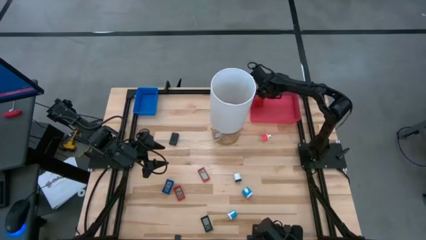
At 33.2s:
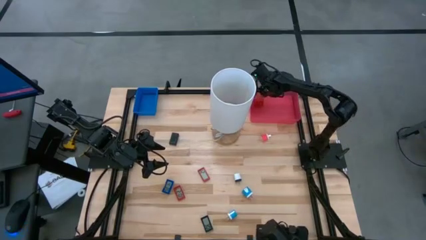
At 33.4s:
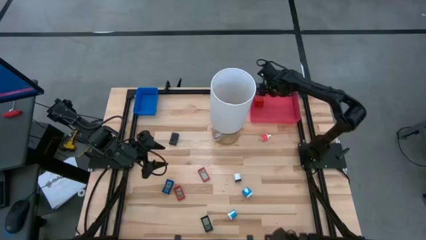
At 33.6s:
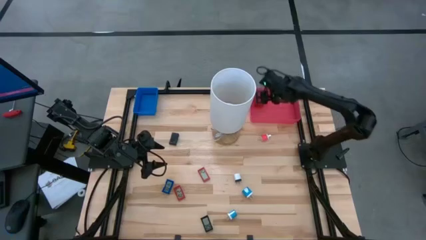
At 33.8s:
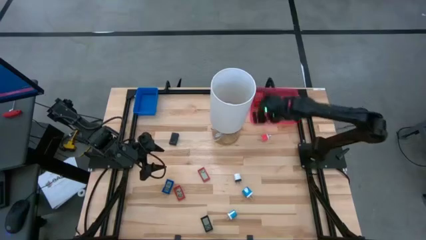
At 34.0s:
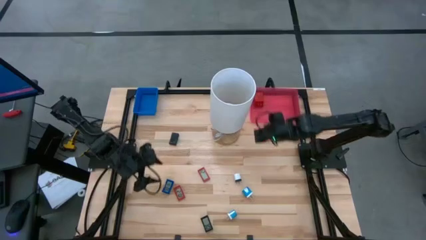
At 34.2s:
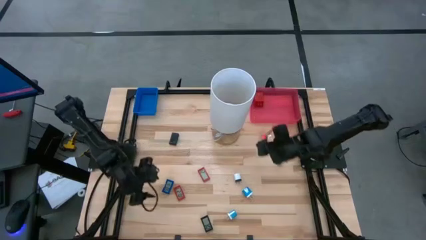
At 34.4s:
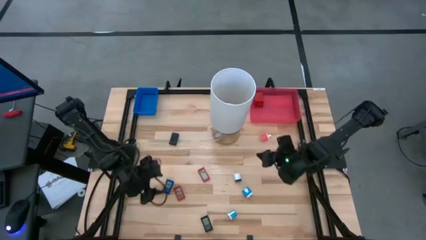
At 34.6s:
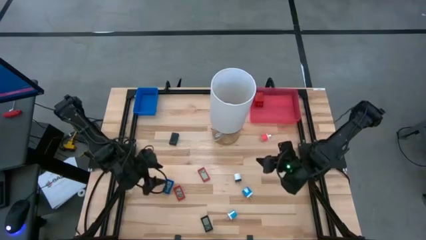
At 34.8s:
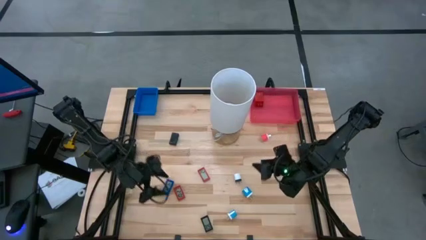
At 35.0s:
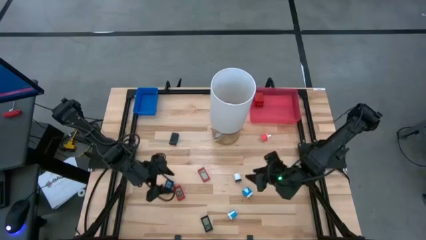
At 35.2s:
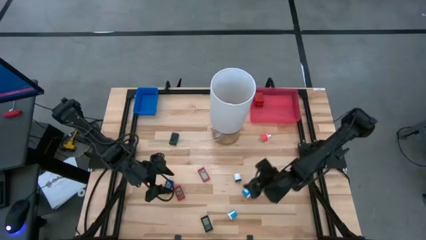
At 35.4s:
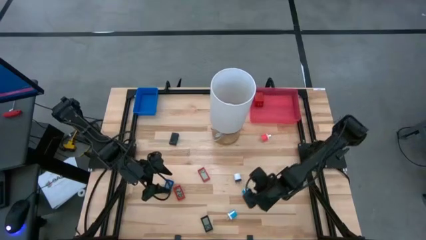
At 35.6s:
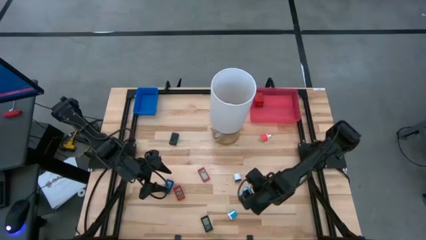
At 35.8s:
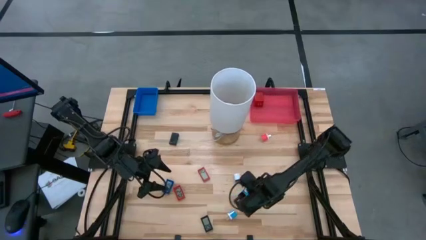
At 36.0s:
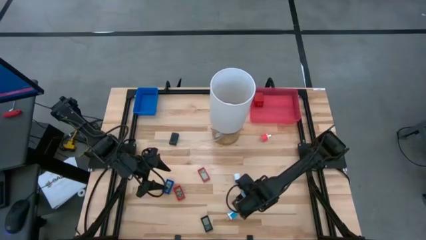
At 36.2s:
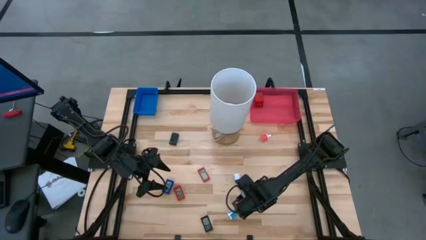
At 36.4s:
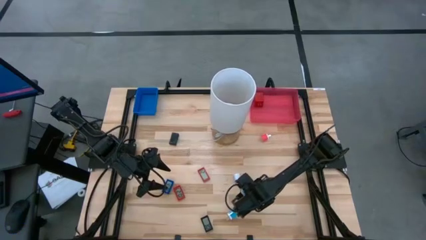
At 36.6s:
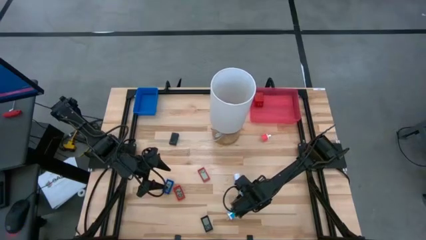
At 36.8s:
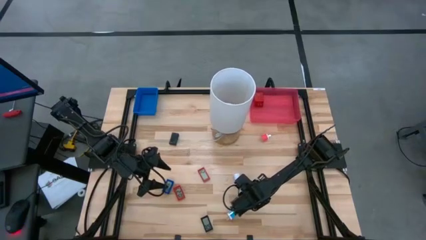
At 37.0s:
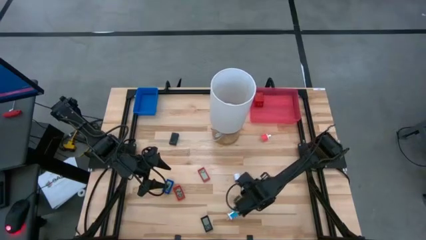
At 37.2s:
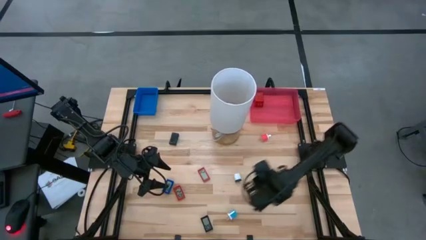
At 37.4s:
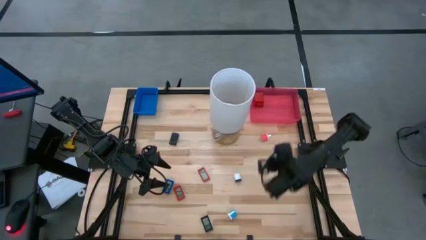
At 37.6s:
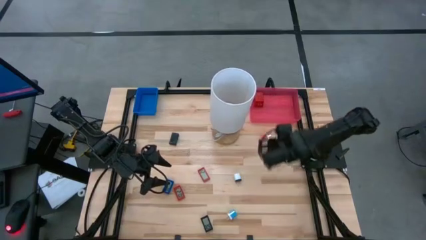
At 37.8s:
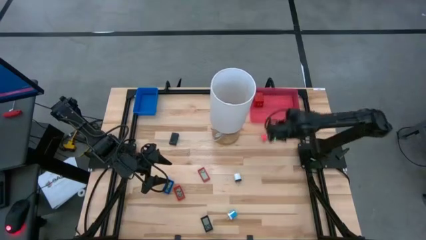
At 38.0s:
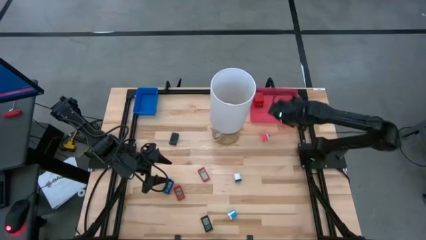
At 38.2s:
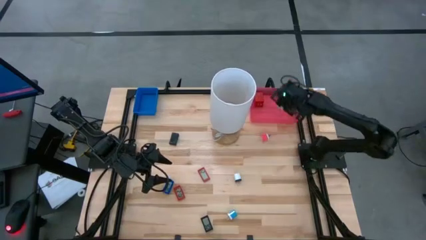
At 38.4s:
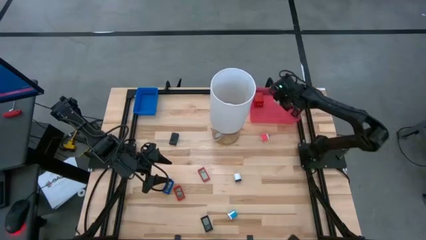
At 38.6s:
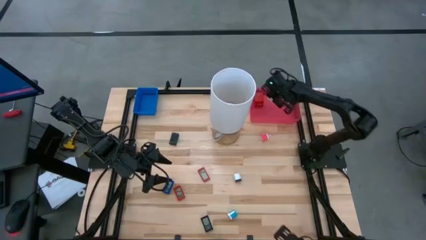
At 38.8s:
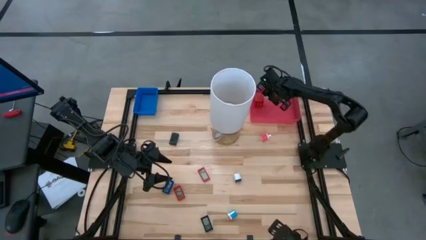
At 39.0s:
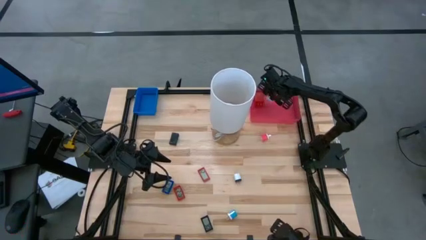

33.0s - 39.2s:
Task: Pick & Place Office items
Put the top blue charger adapter into the pink bin

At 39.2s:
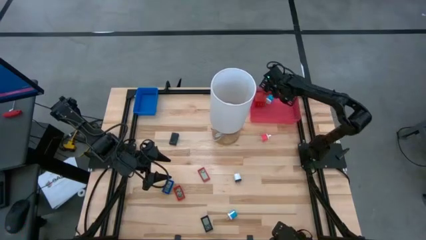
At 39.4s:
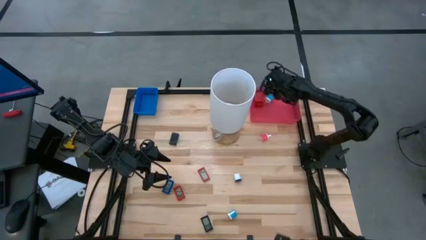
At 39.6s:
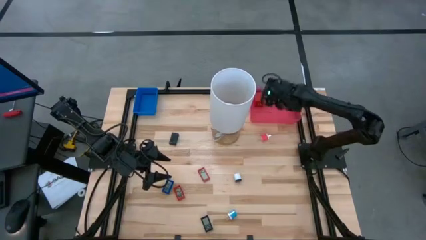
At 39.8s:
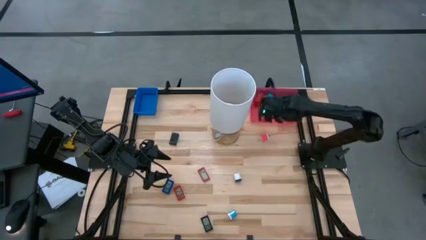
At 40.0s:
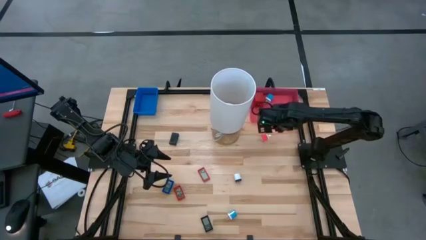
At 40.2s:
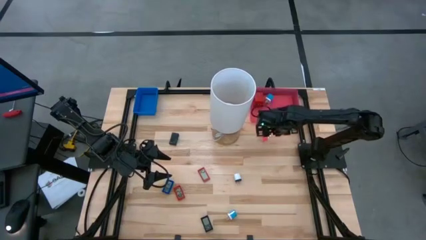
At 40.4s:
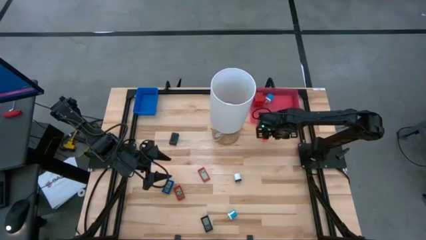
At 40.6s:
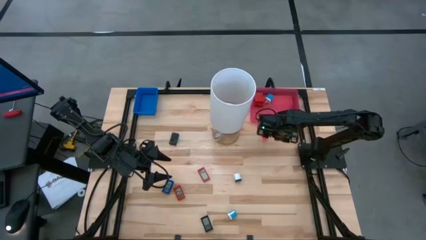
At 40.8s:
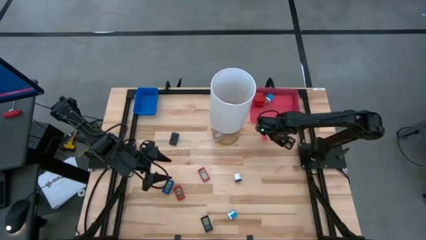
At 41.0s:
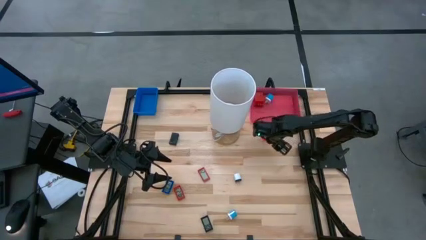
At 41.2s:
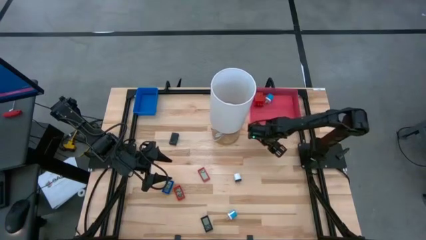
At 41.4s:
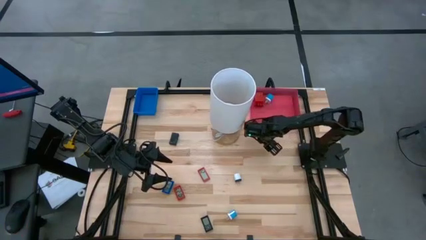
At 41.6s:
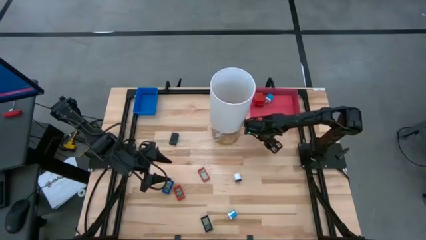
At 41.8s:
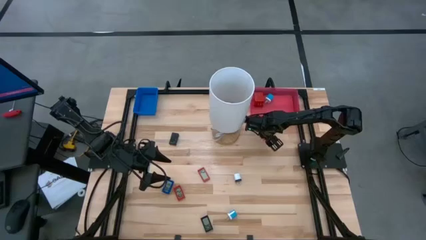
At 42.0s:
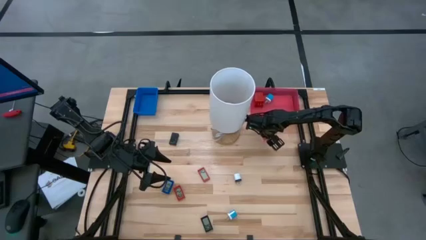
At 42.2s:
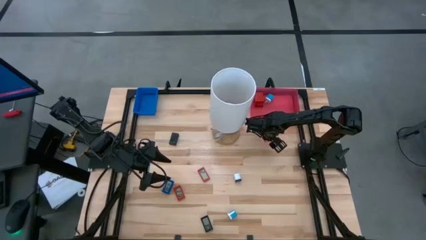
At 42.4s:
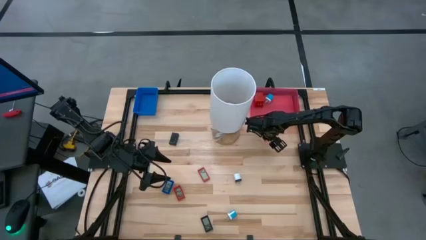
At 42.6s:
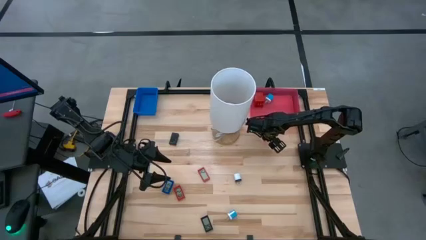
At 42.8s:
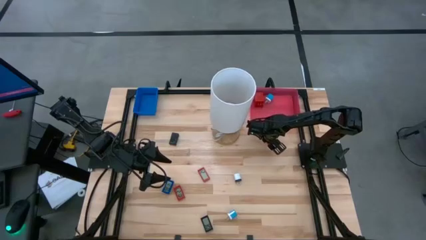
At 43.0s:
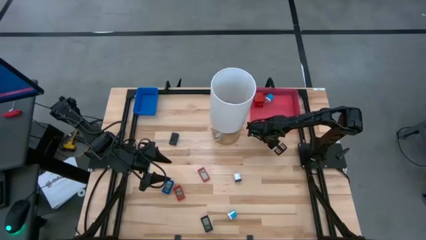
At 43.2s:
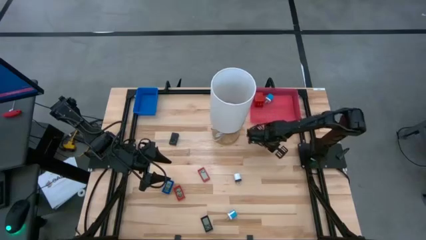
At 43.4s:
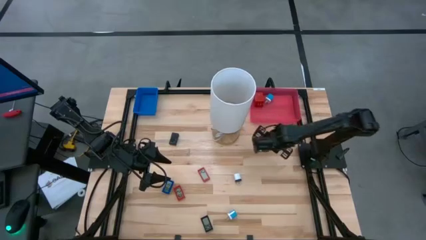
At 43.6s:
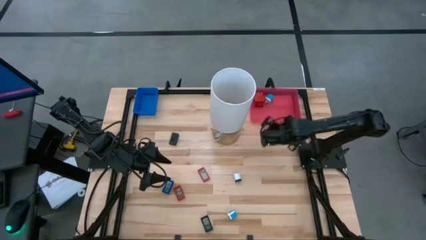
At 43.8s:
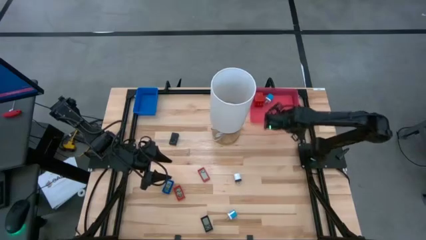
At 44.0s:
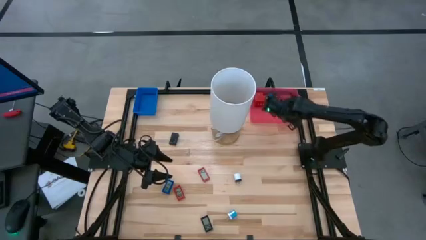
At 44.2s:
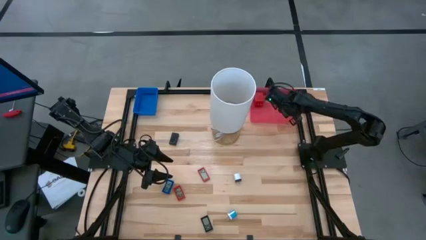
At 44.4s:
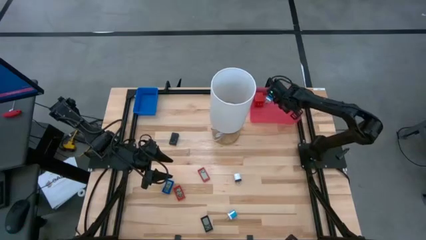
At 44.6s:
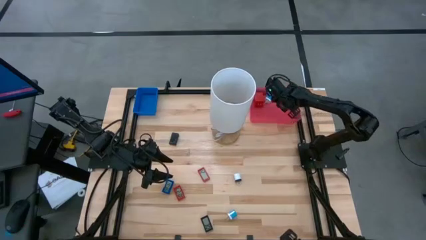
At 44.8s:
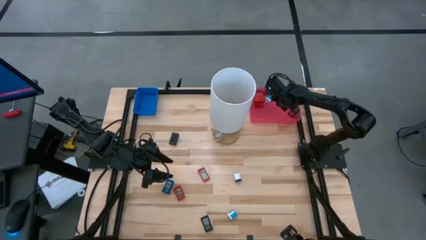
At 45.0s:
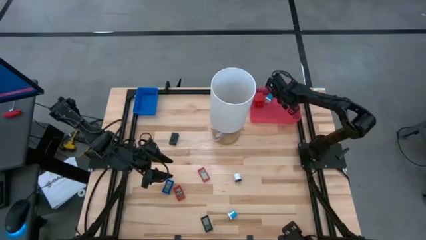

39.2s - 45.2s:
Put the pink charger adapter into the pink bin

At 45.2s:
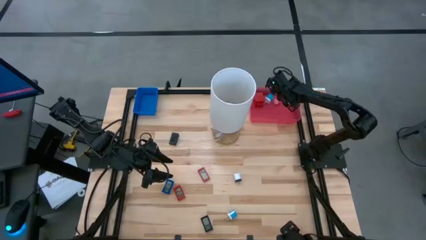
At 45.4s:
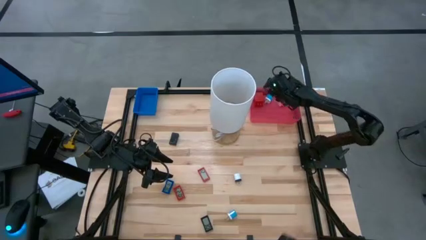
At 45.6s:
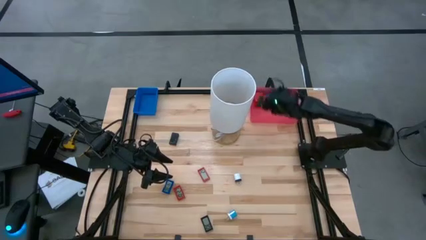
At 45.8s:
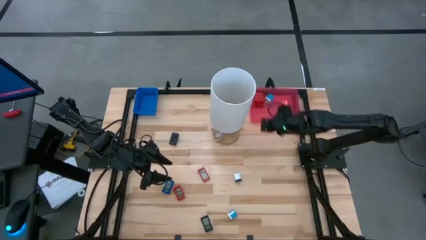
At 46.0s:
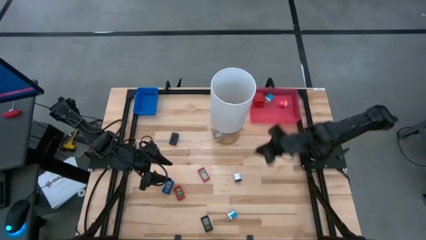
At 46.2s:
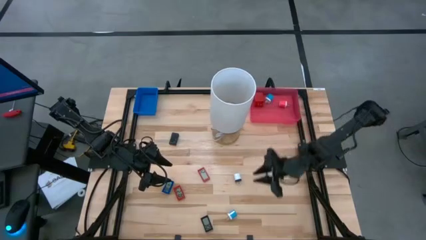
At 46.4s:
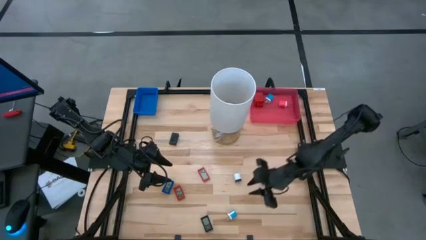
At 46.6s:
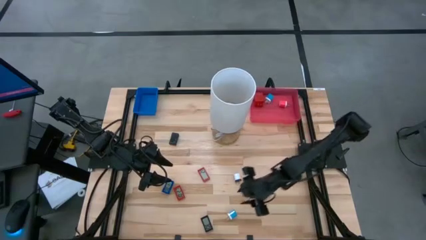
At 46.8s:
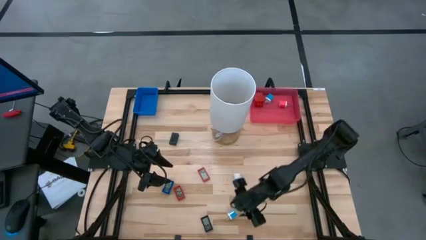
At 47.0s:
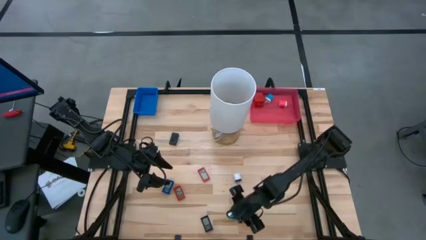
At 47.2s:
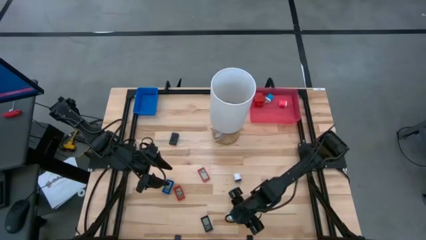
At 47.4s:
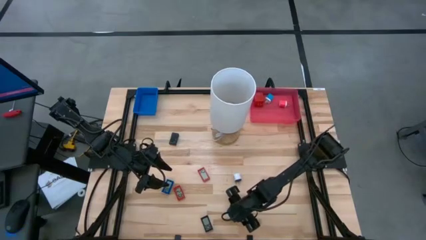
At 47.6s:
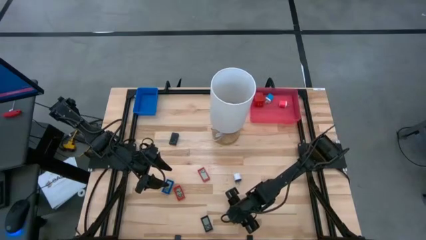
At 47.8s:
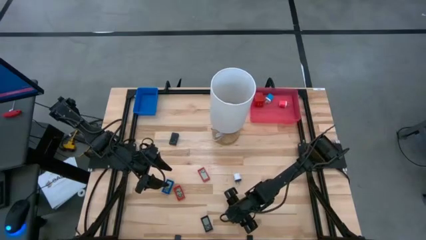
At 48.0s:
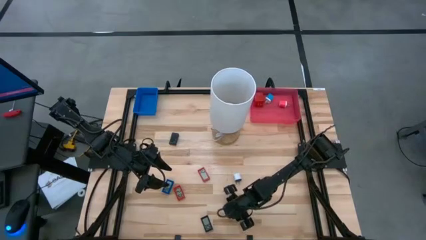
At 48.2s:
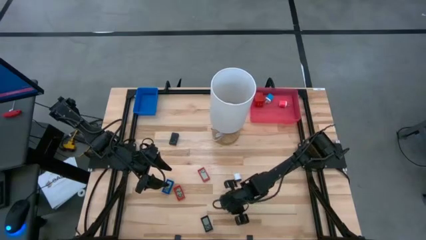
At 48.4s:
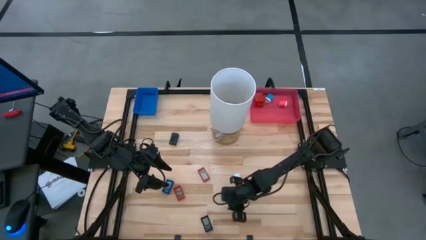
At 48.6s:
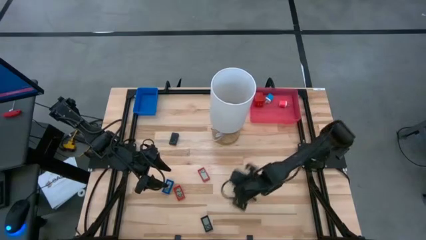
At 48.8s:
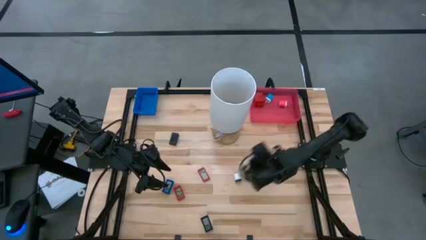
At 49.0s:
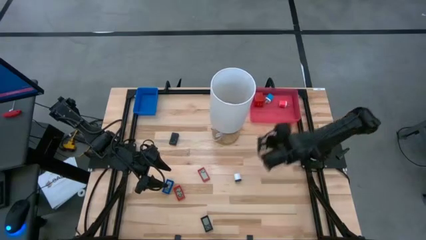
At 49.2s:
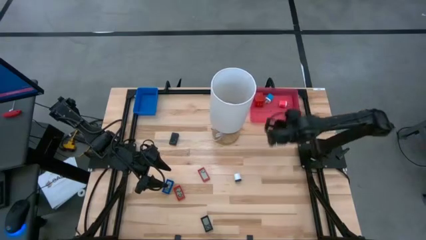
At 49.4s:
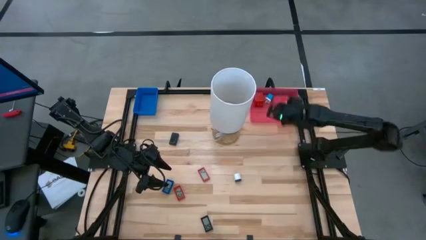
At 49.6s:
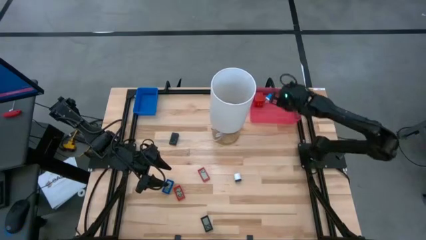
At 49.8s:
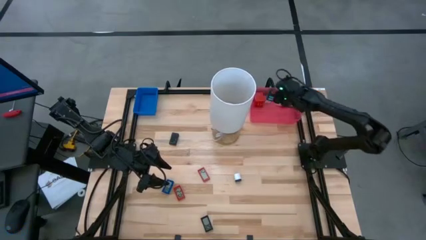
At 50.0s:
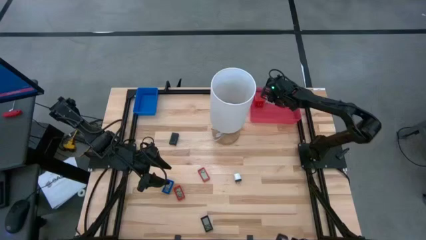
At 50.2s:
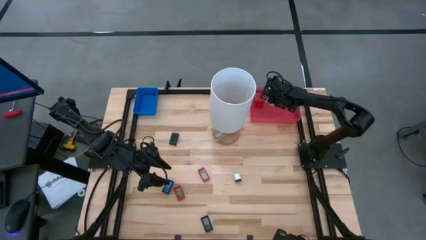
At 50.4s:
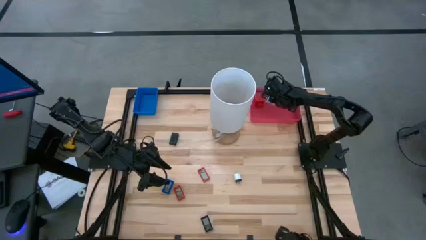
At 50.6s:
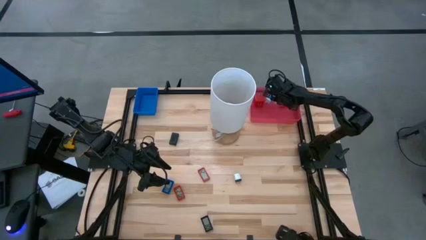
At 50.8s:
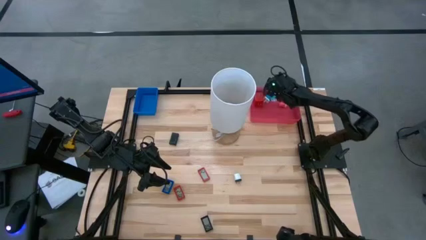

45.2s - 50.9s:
Put the blue charger adapter into the pink bin
